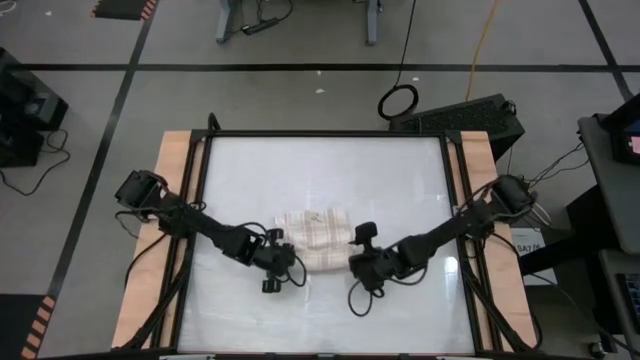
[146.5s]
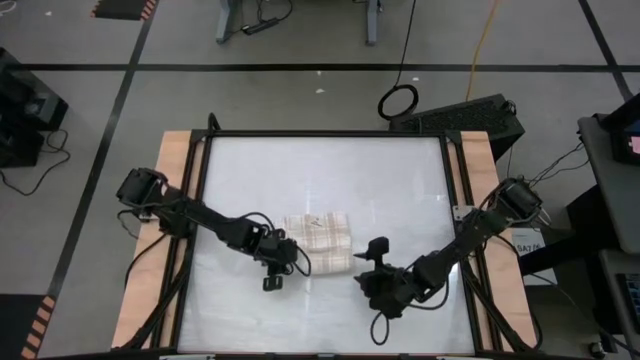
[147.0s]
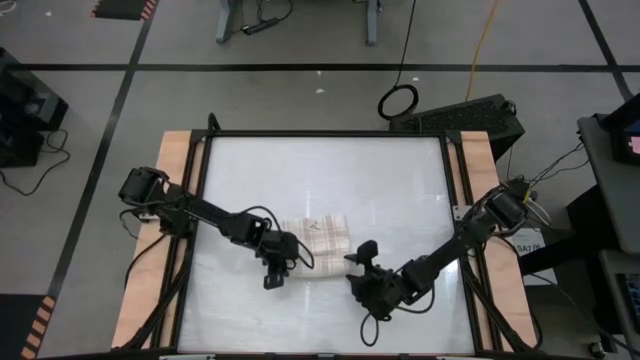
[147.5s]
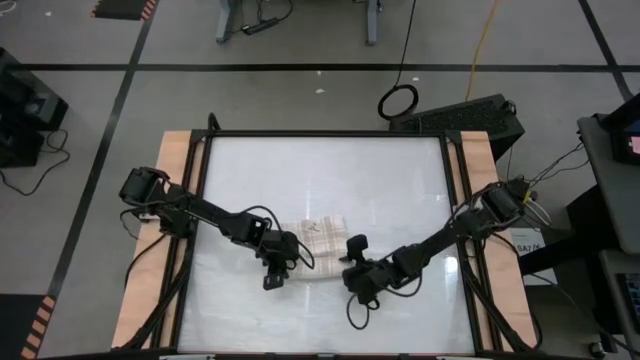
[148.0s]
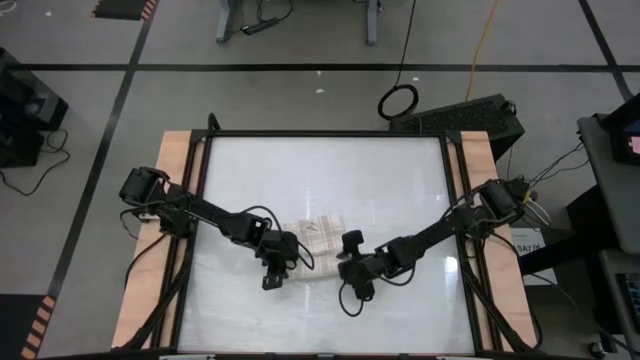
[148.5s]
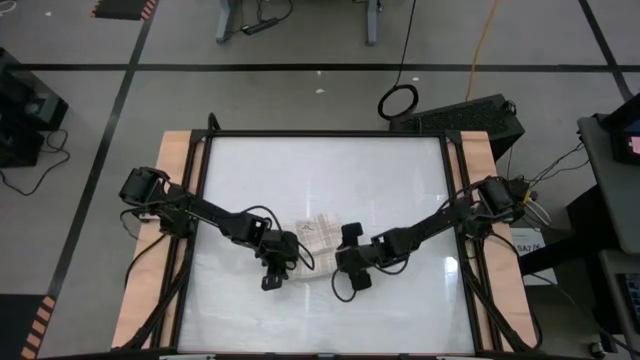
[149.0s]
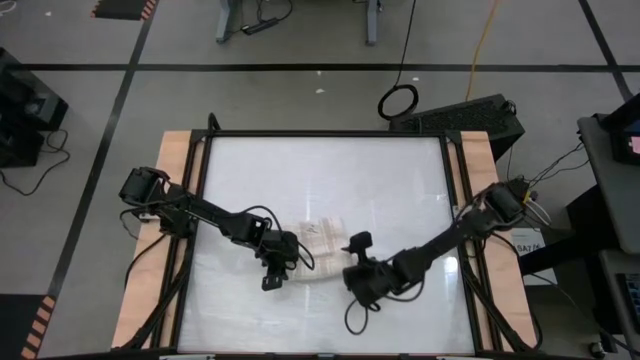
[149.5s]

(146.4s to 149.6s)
Task: Roll towel
Roll the white towel

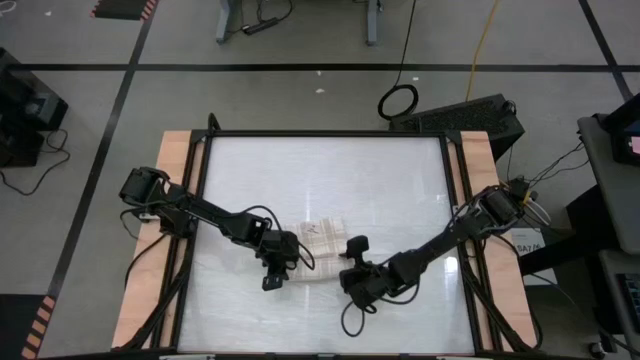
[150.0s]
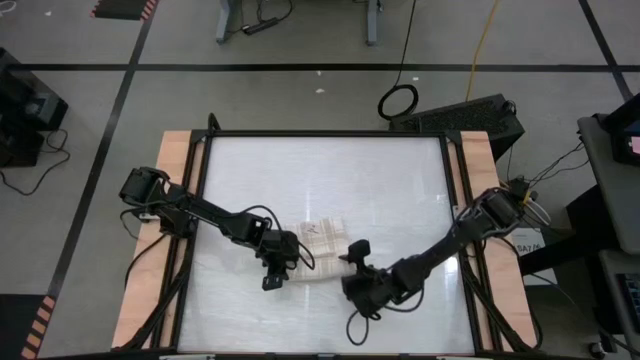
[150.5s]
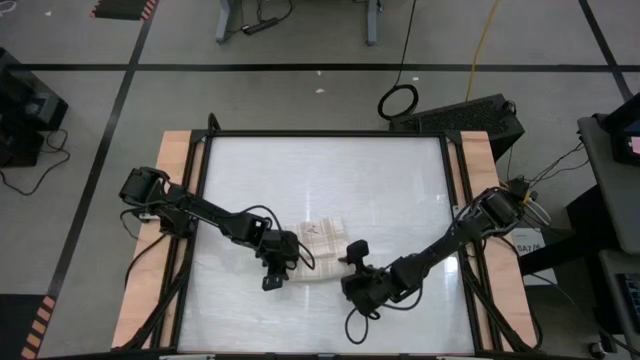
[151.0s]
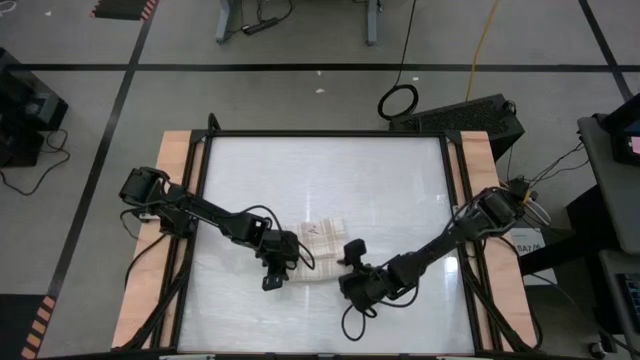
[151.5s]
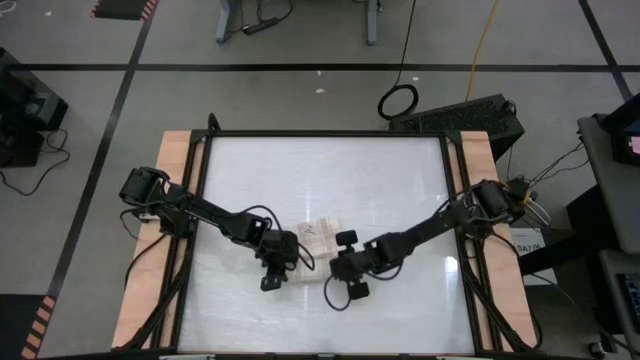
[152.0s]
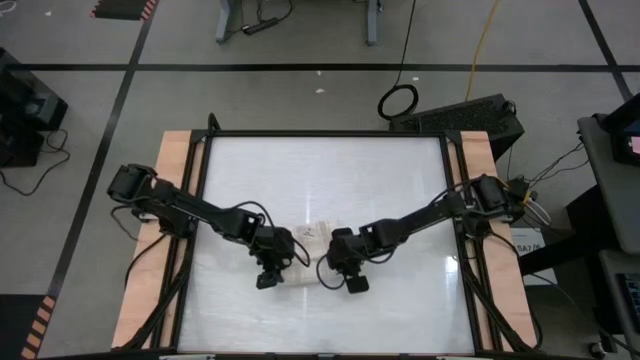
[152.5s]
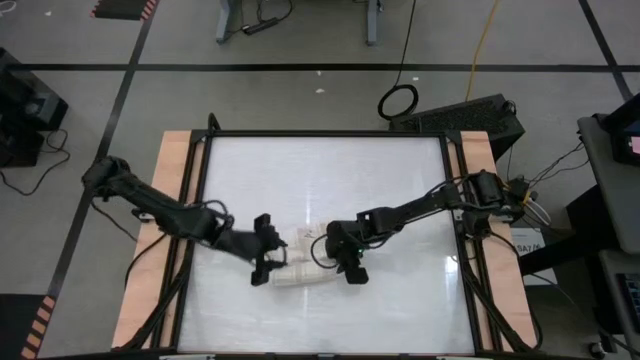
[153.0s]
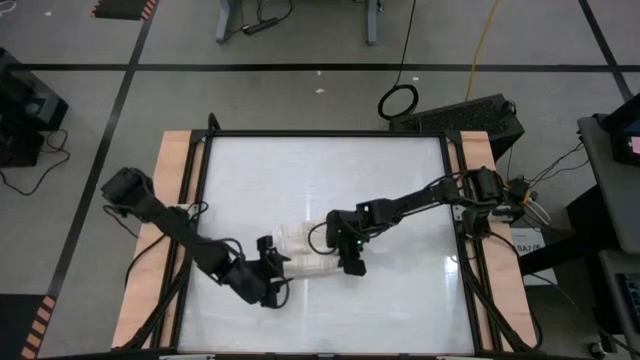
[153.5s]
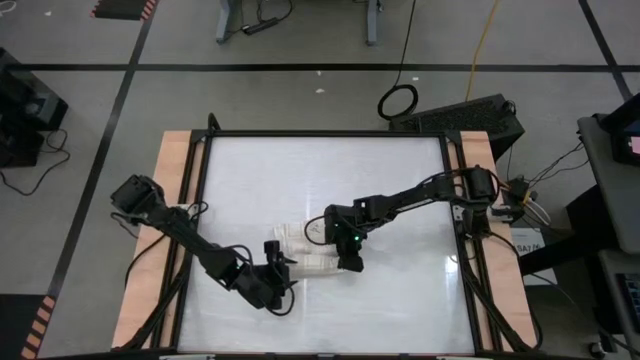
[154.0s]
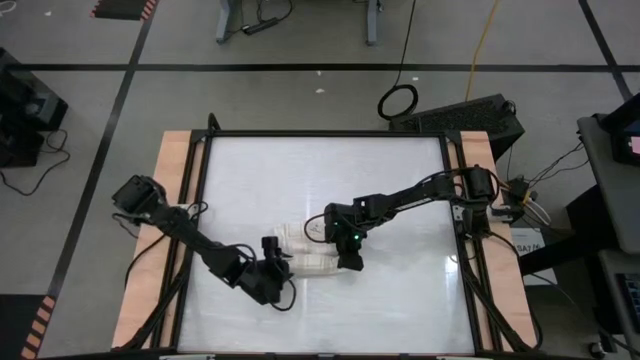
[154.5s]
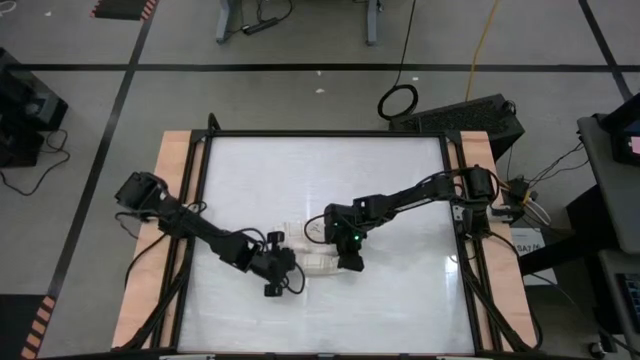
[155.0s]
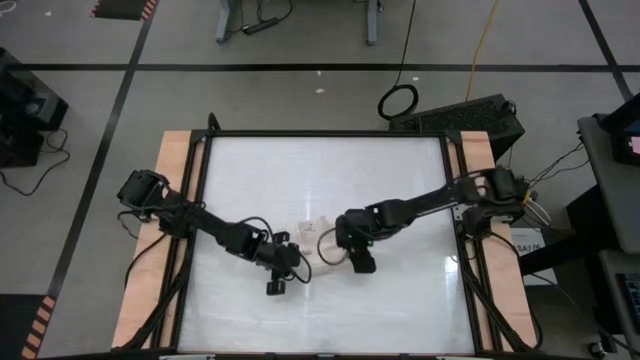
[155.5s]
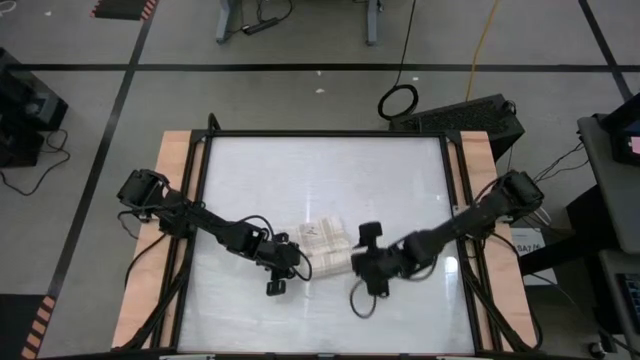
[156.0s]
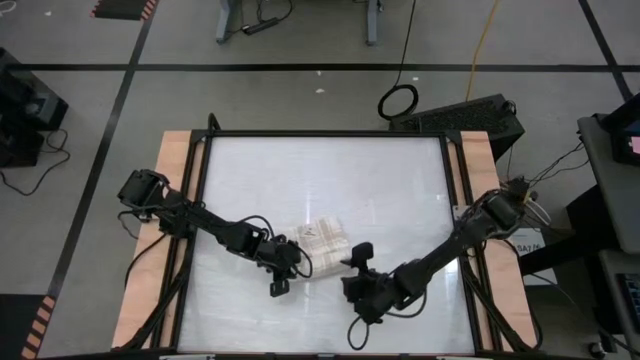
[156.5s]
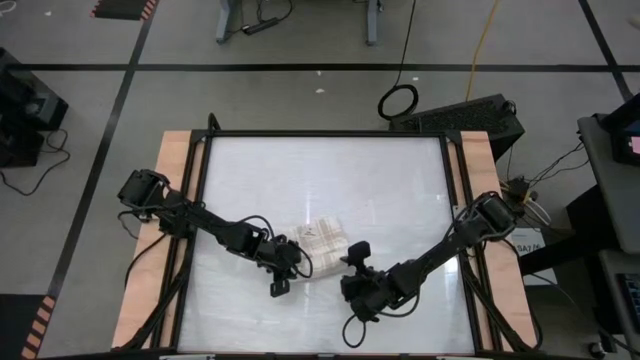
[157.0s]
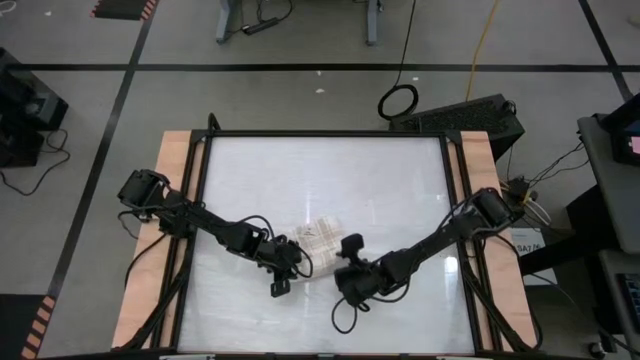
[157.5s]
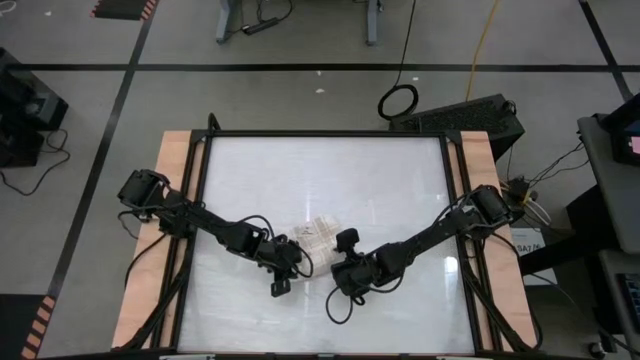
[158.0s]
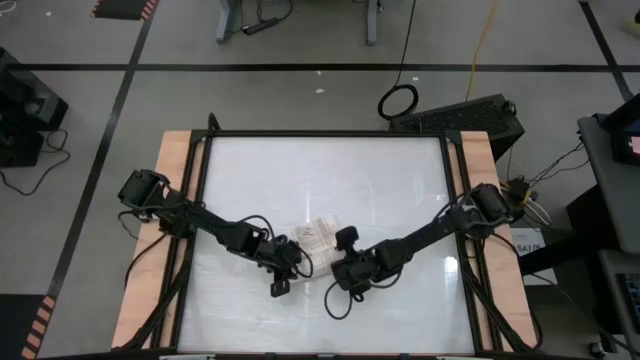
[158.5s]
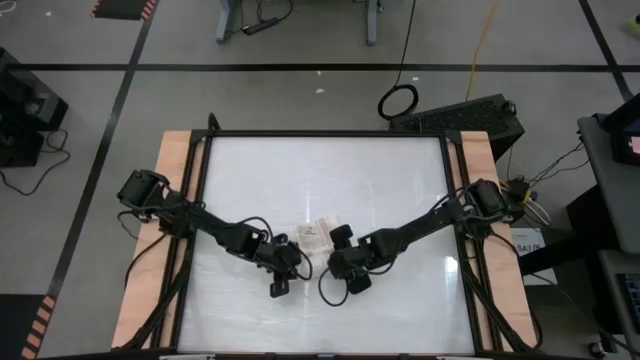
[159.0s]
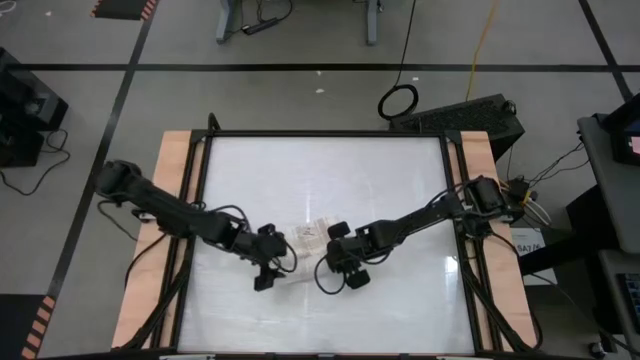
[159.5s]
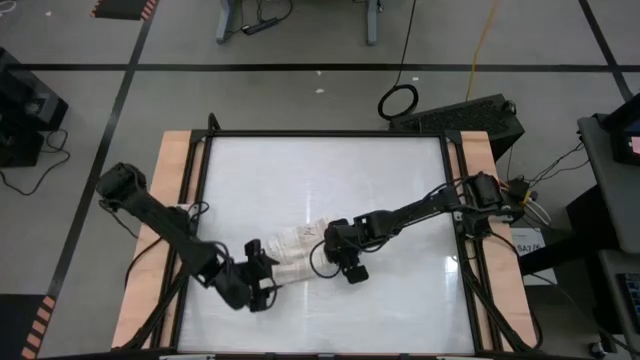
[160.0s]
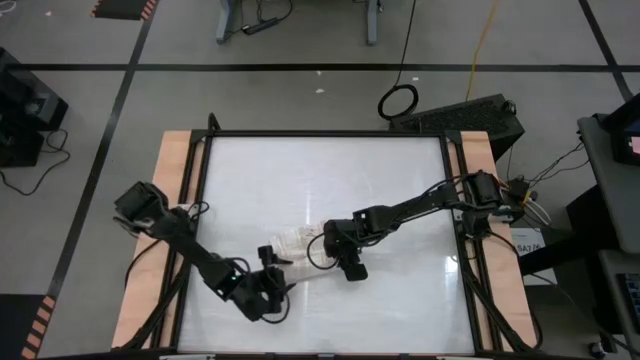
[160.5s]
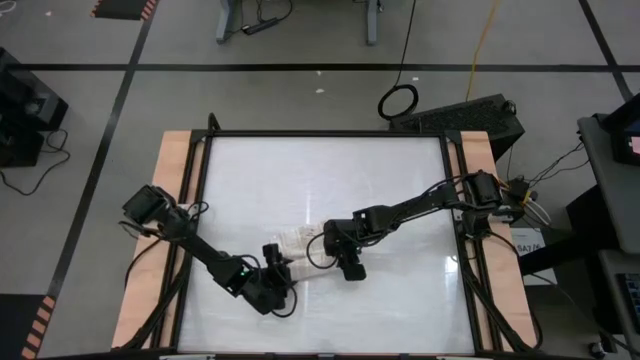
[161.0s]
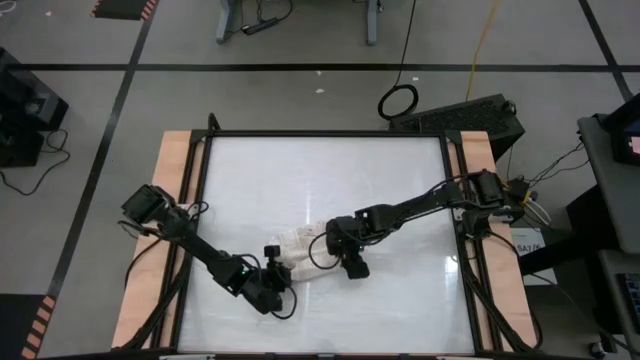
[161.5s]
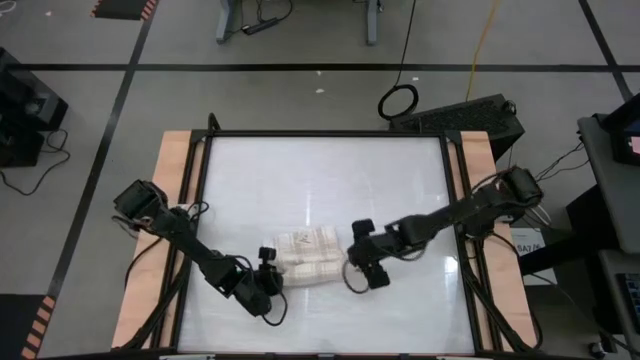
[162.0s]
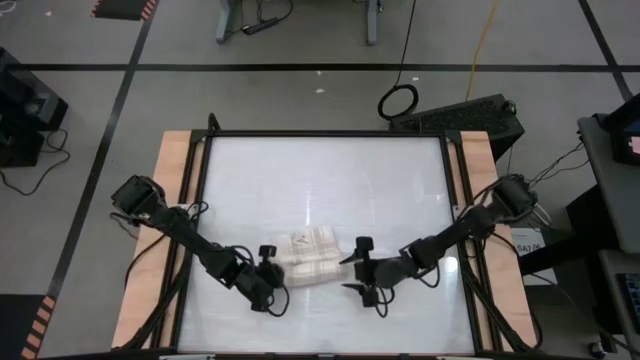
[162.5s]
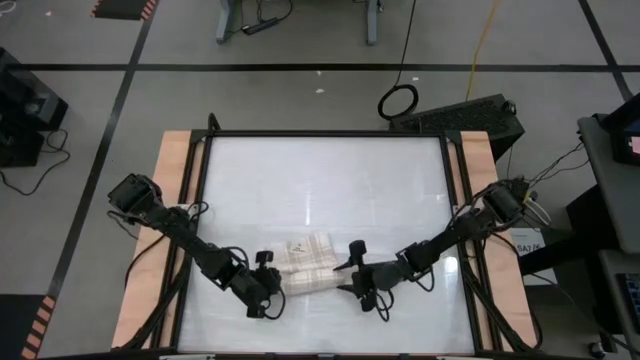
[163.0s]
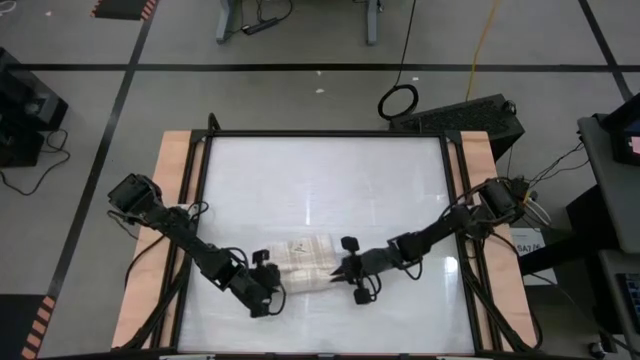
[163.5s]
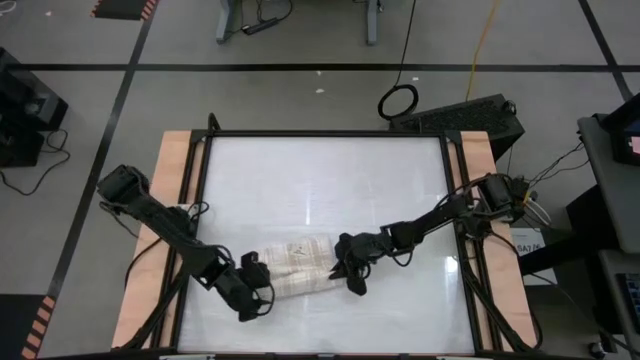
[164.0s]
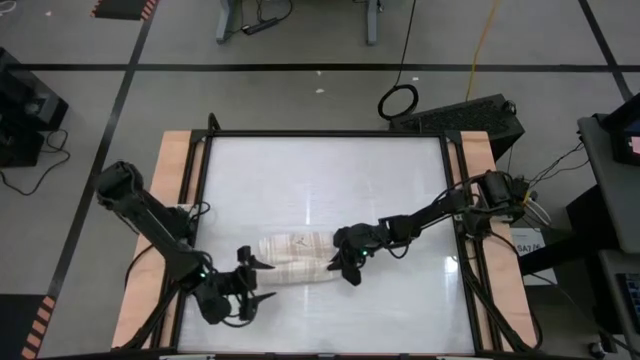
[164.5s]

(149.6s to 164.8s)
Roll the white towel

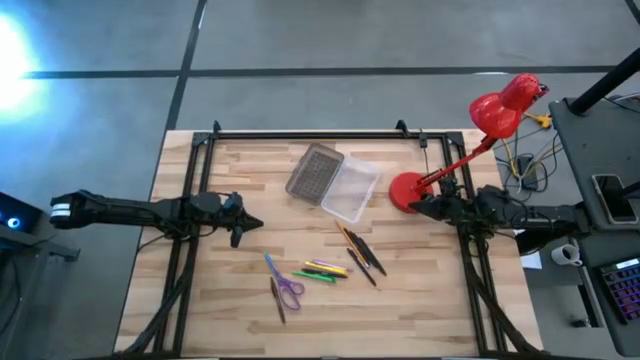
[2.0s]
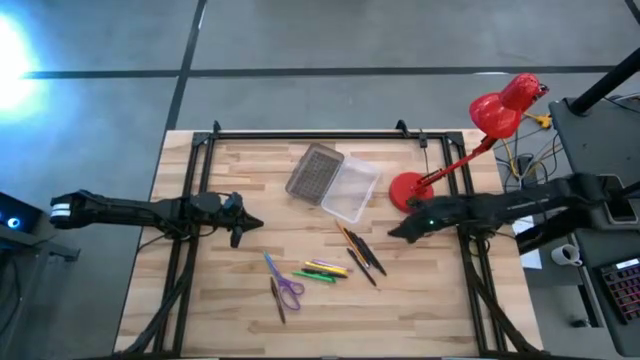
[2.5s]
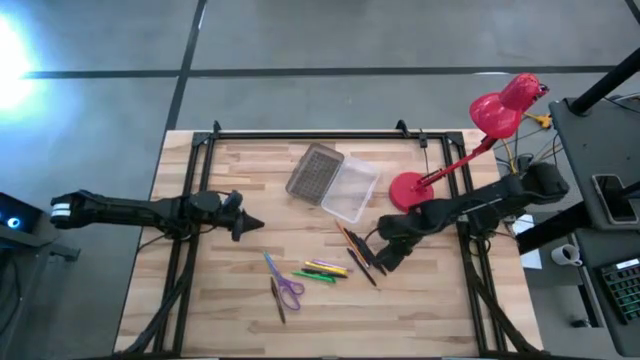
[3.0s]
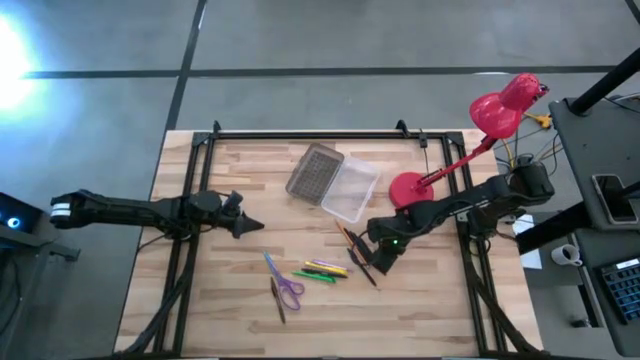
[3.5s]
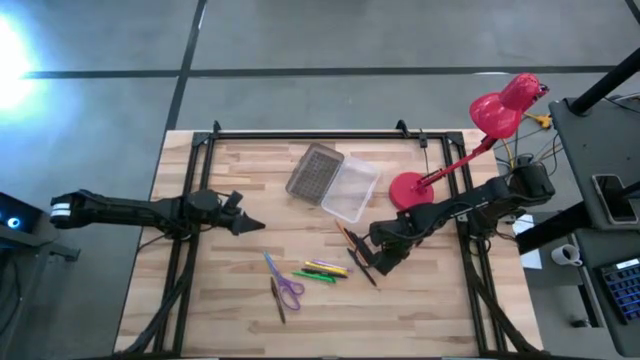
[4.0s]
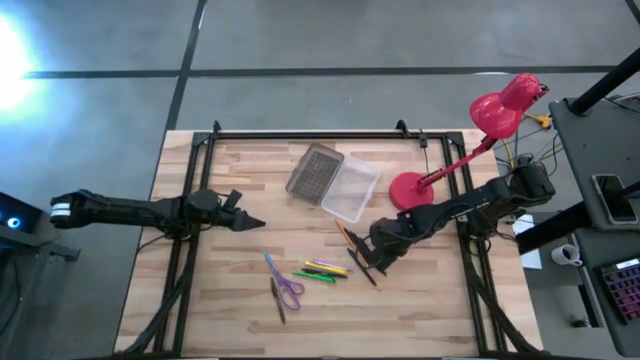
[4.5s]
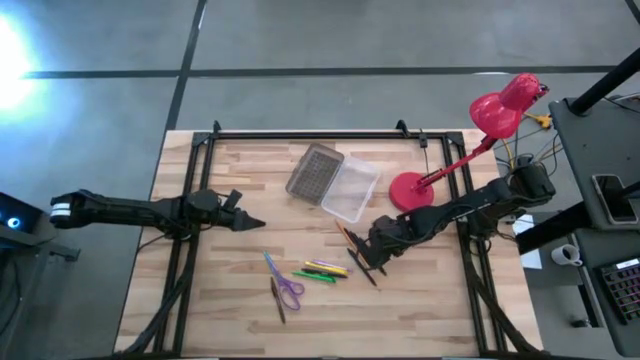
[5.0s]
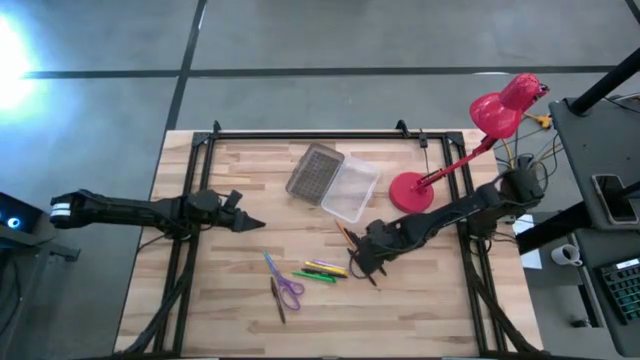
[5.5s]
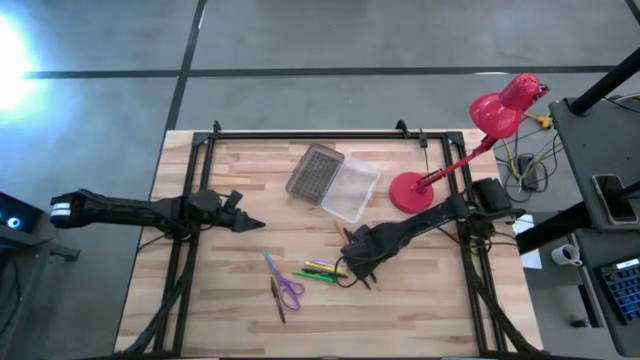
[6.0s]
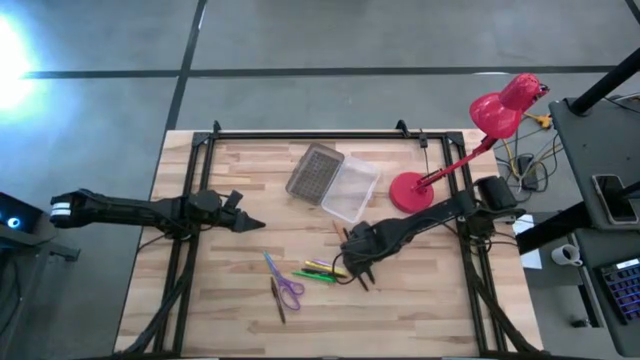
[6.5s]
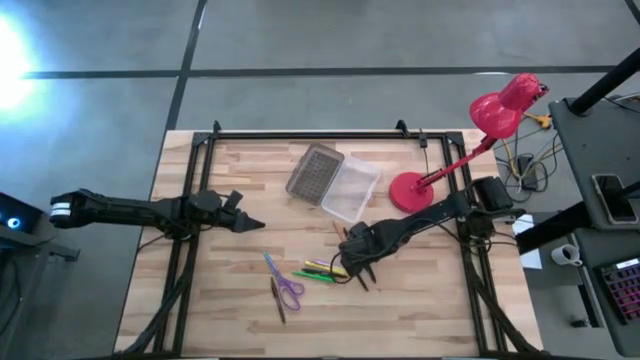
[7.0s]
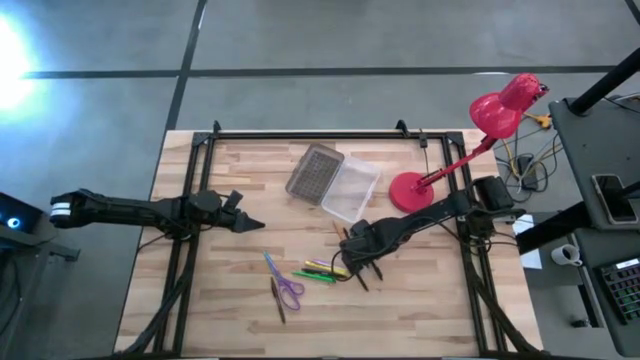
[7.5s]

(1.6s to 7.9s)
Task: Pick & place school supplies into a supply box
Put the black pen into the black supply box
